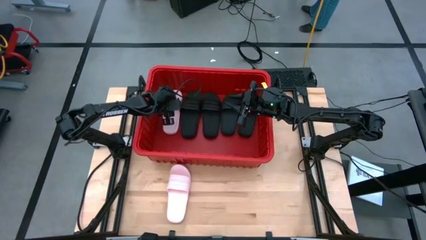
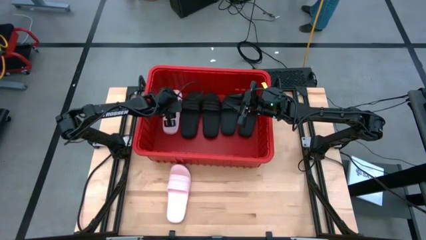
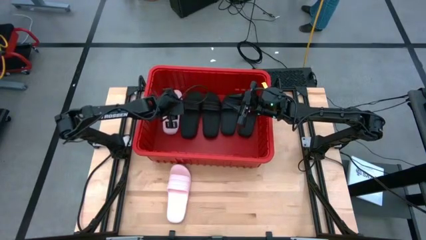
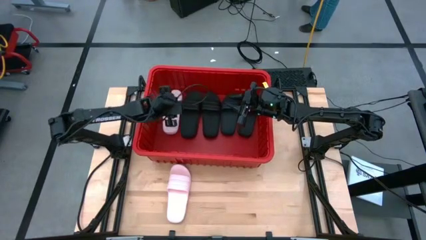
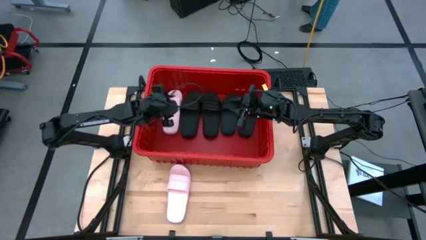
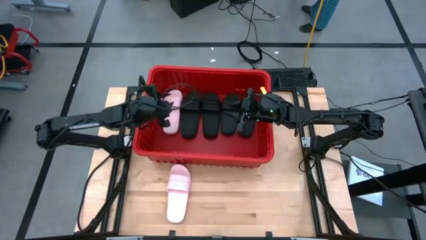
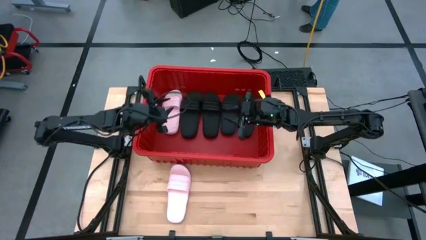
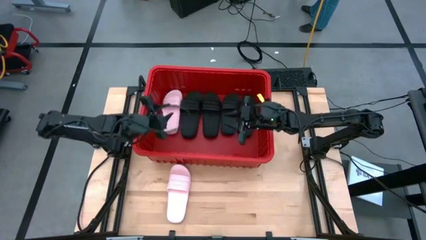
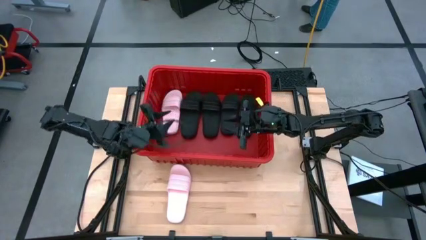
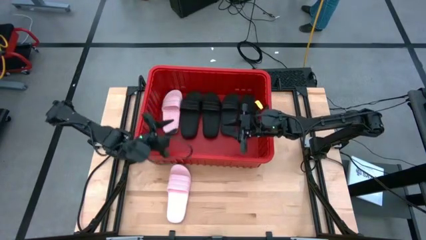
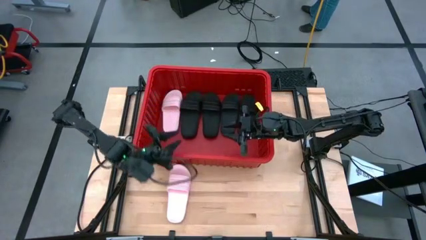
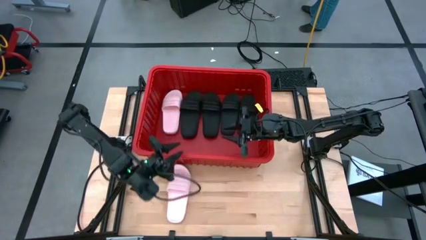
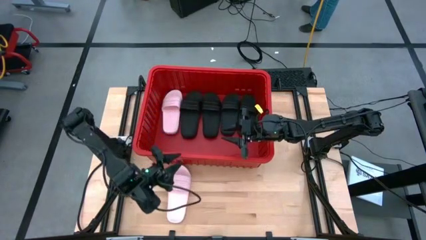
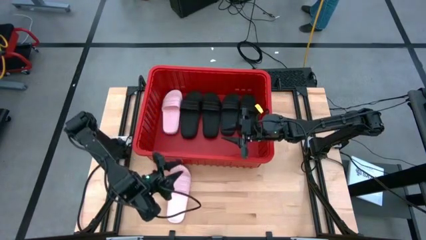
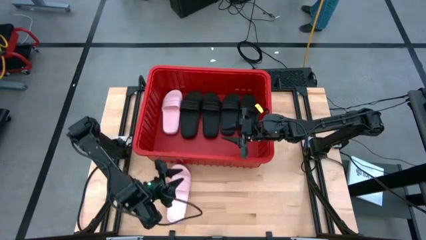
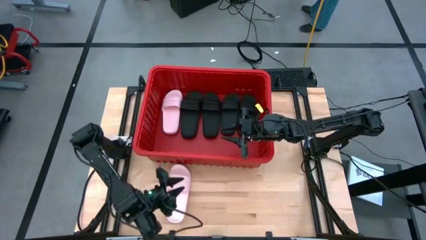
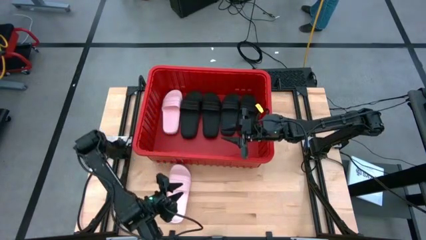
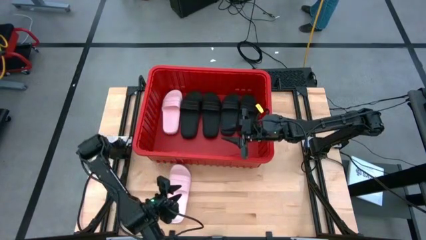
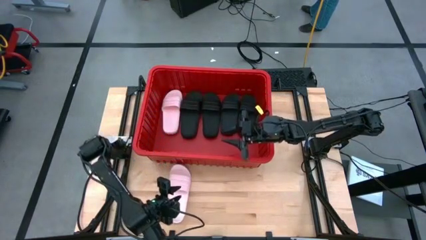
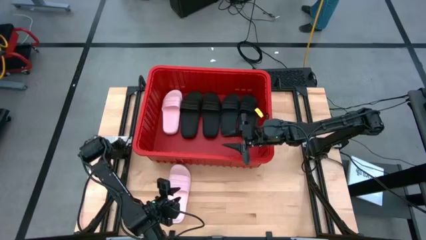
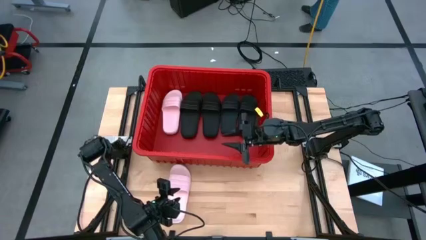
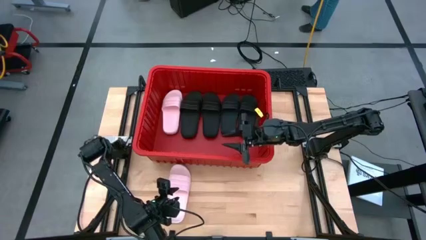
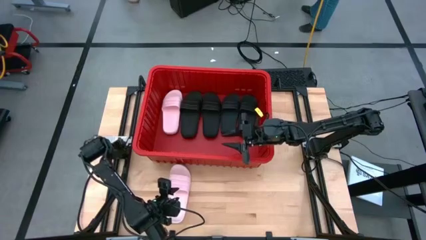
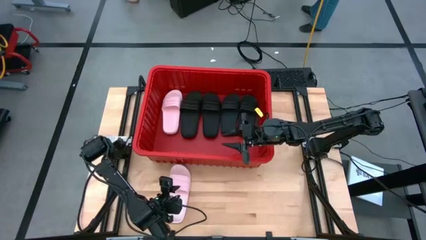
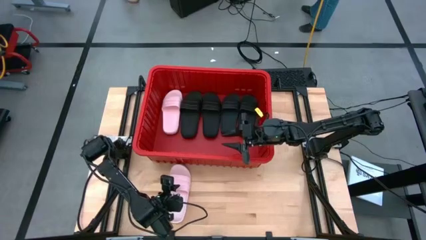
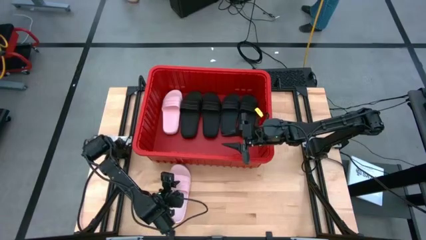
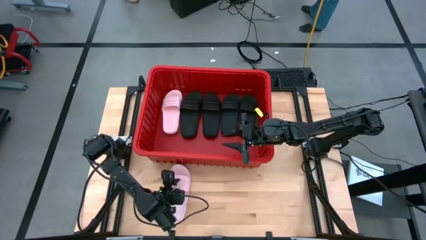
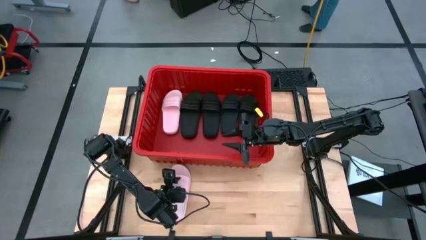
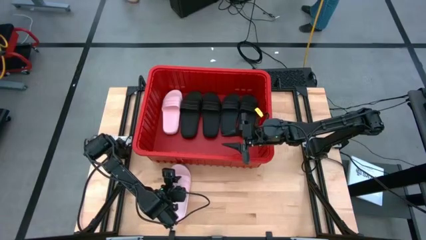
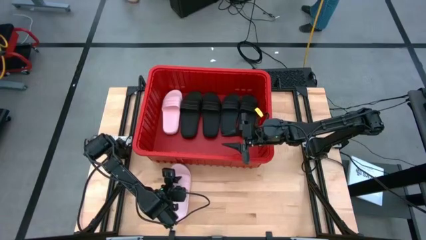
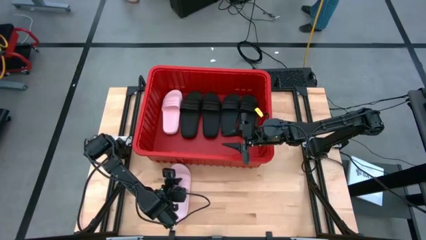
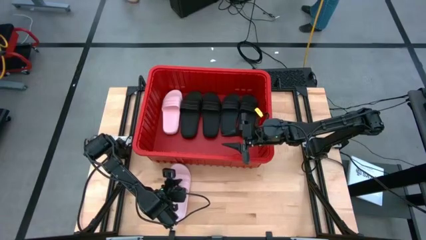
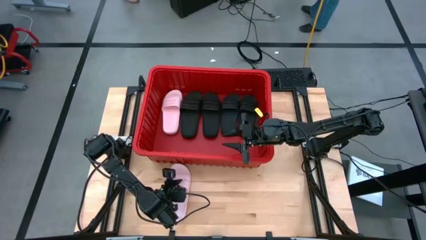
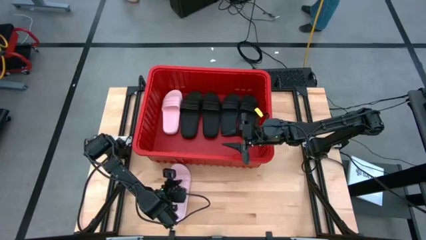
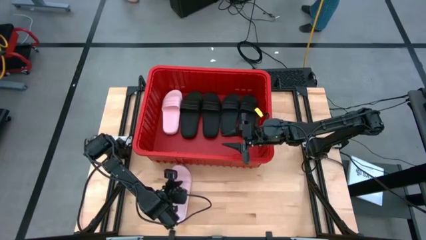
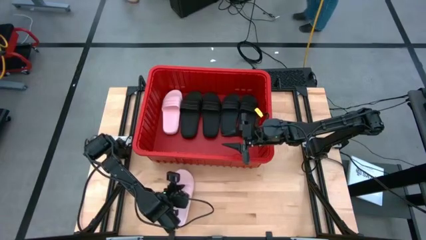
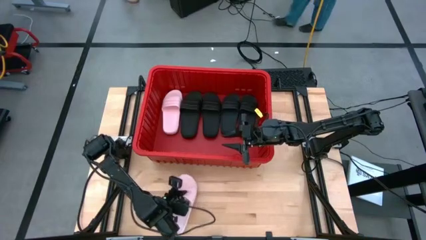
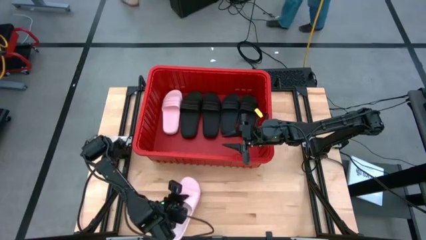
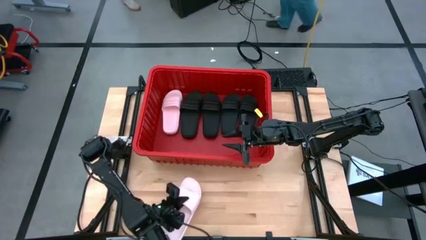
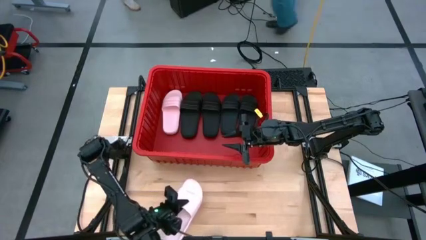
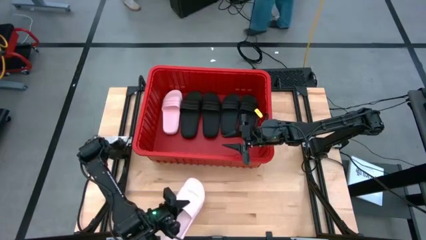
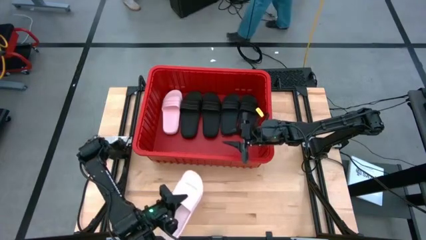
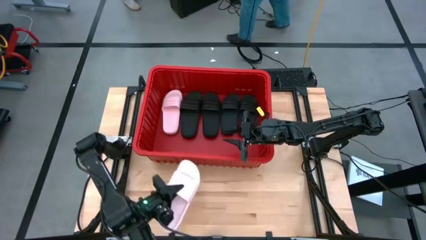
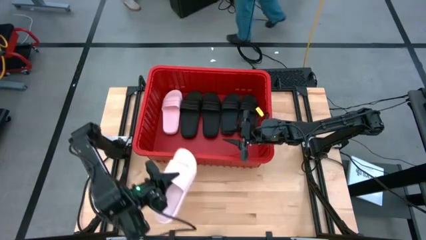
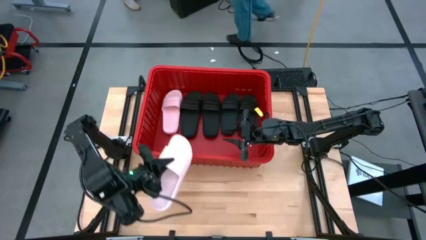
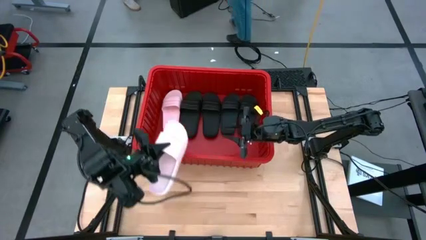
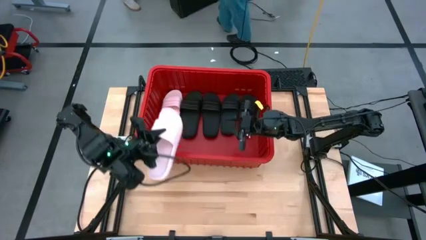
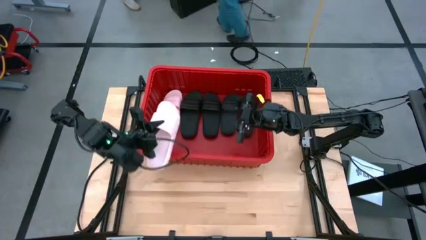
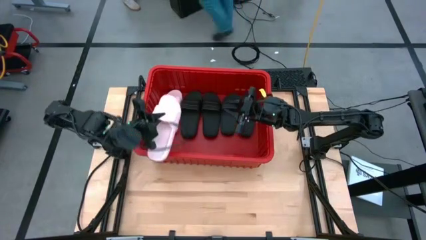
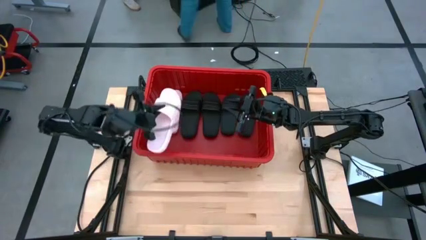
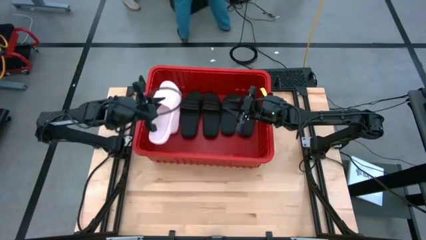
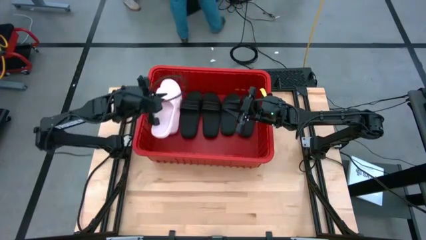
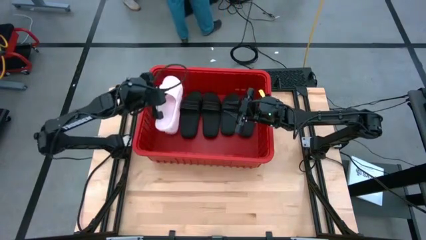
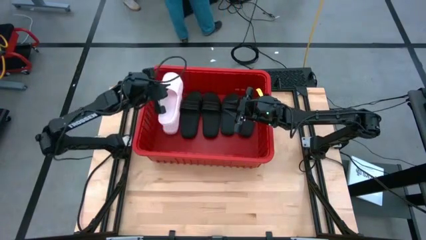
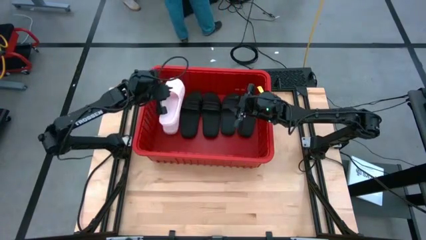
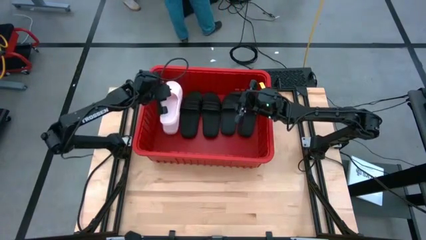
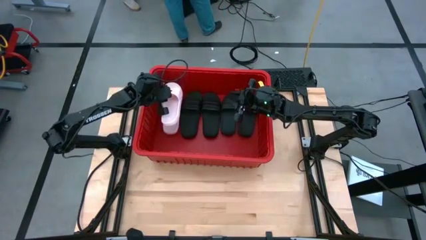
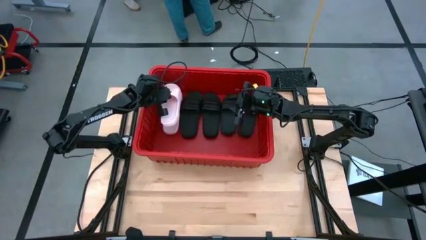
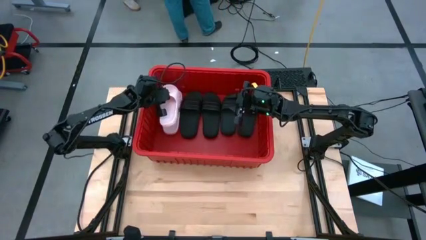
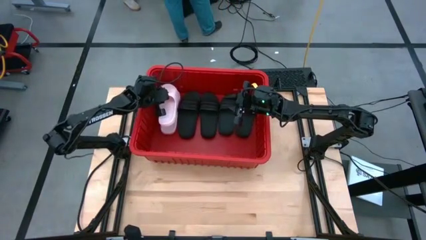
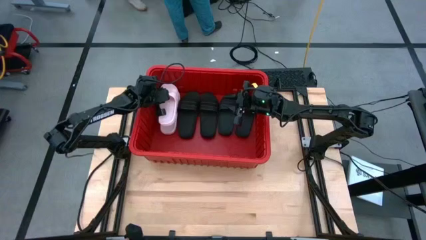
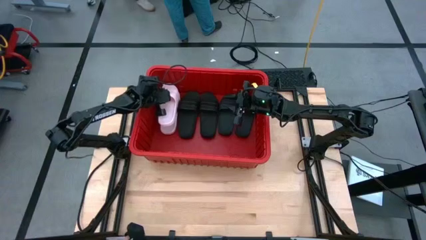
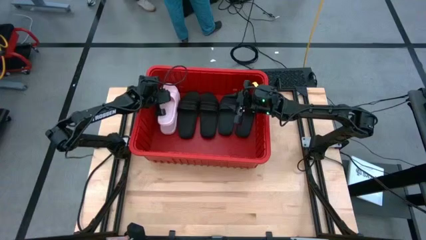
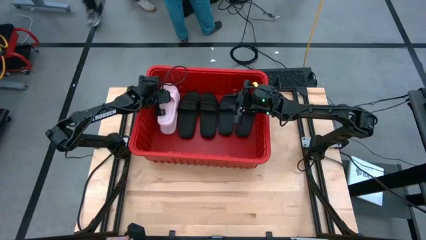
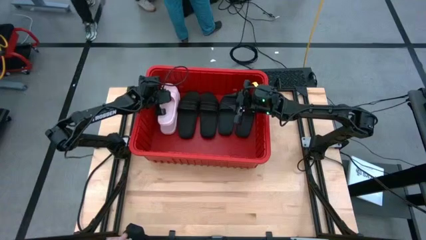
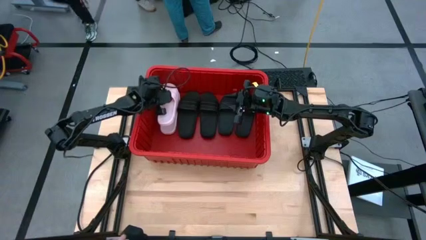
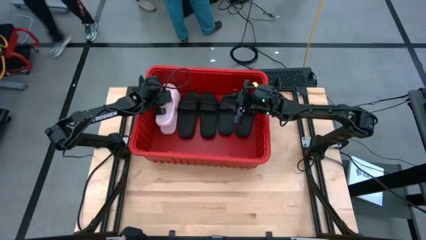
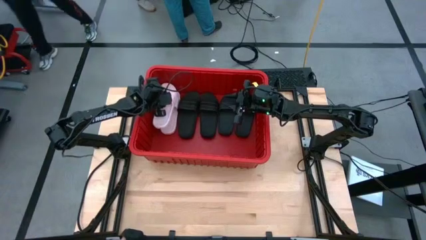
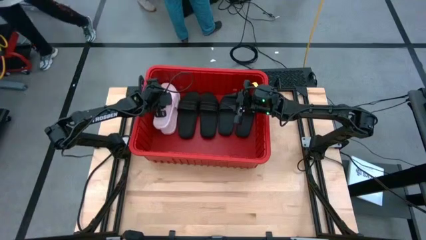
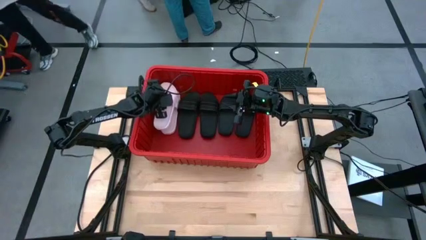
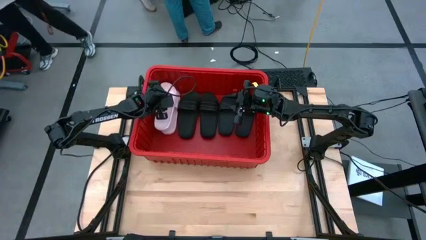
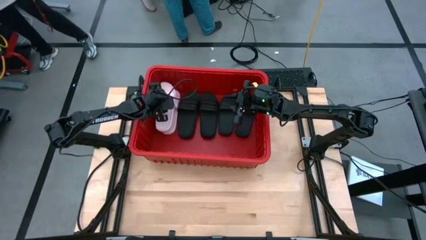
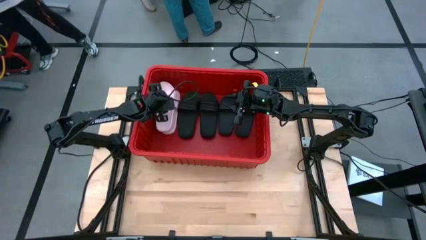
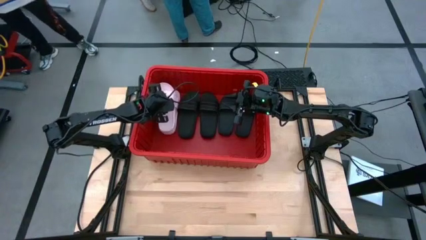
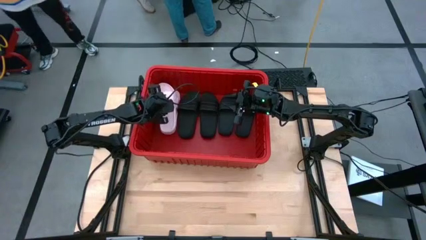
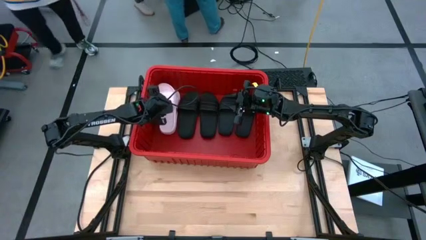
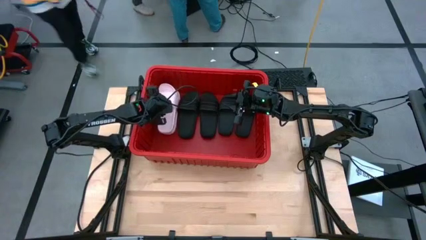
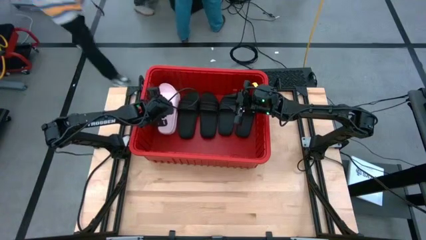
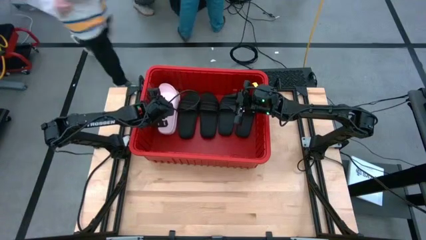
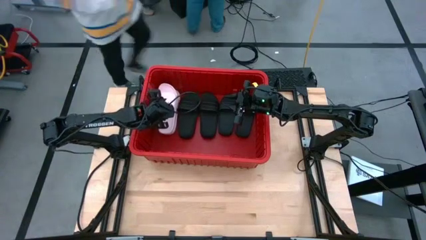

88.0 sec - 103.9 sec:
Task: Pick and place slides into bin
Put the pink slide into the red bin

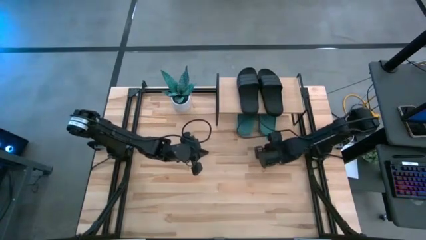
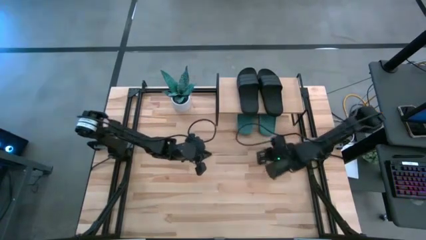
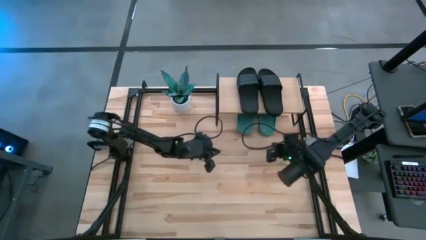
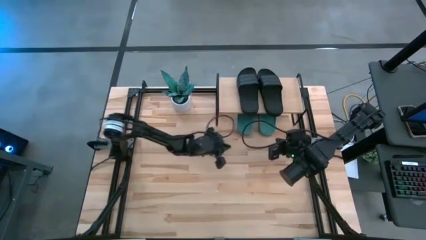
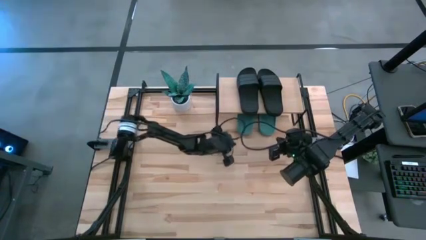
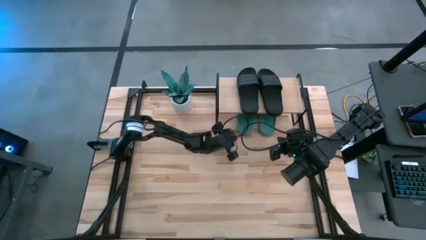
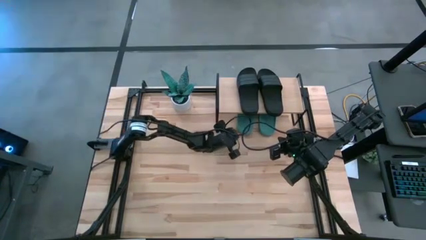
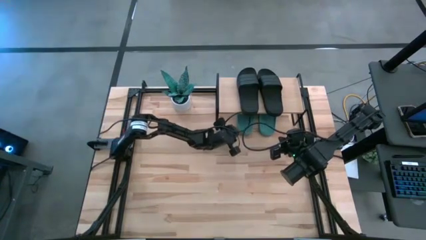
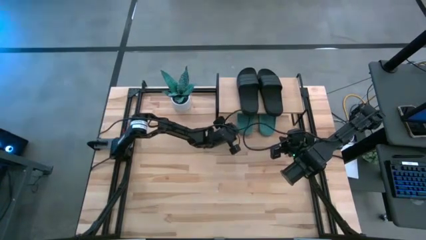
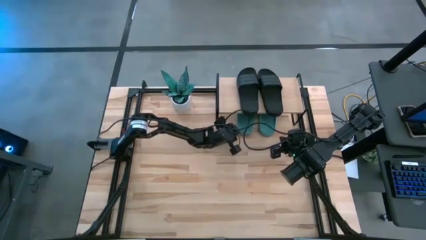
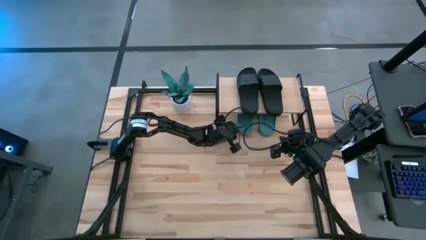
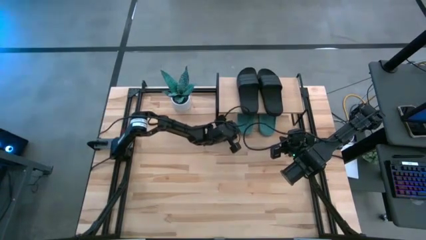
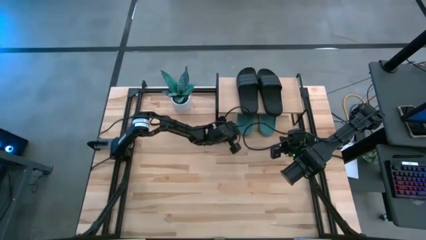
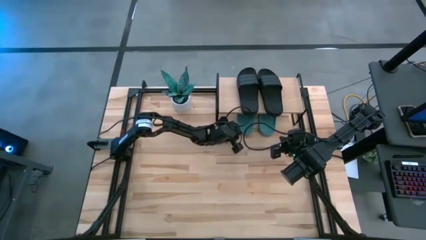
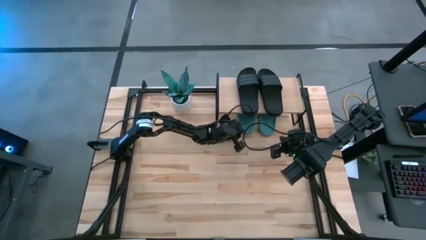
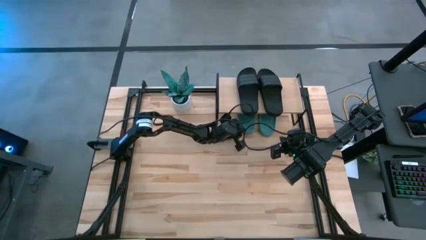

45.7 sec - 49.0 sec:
Task: Pick and place slides into the shelf
Adjust the left green slipper
